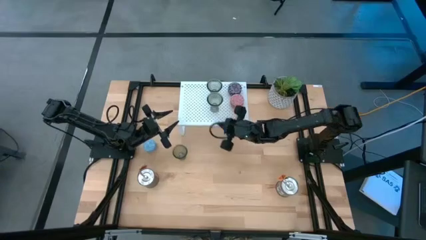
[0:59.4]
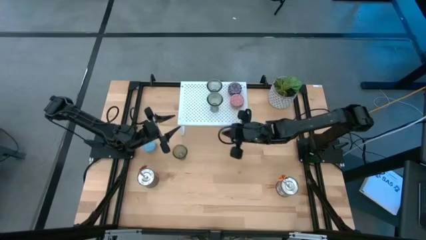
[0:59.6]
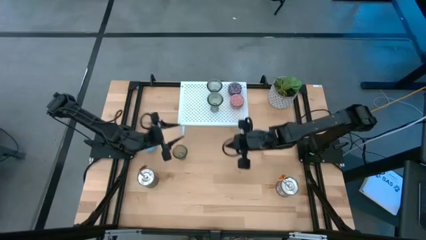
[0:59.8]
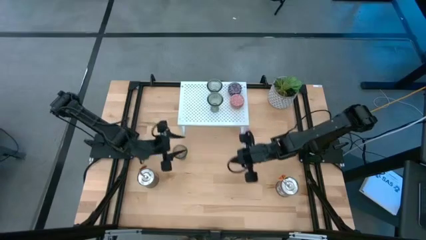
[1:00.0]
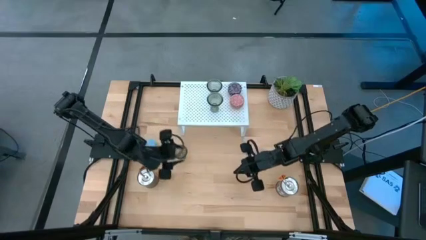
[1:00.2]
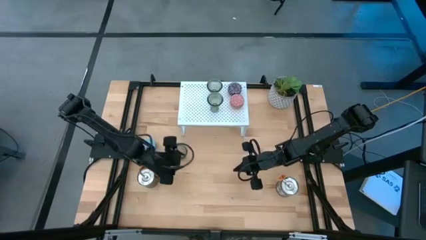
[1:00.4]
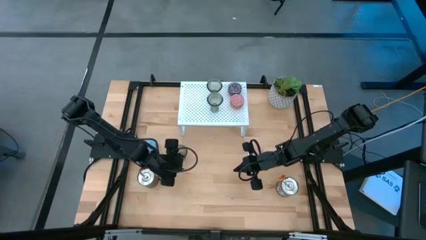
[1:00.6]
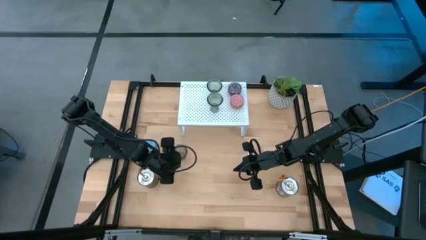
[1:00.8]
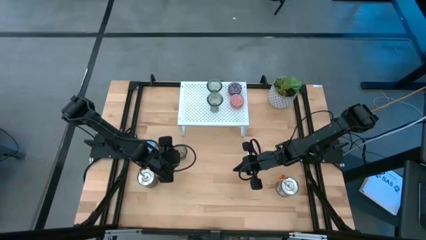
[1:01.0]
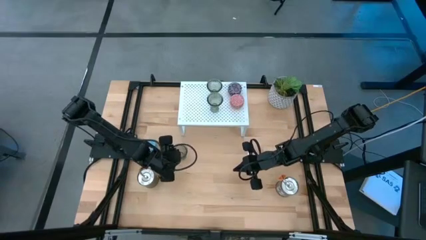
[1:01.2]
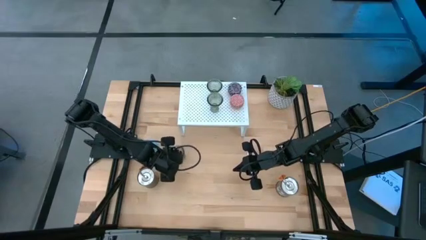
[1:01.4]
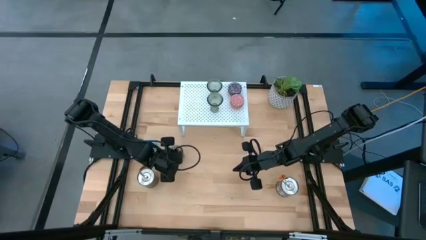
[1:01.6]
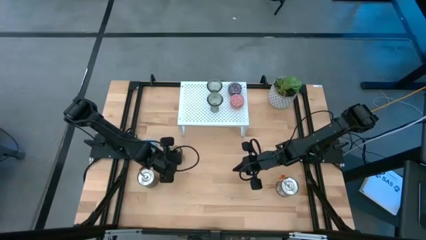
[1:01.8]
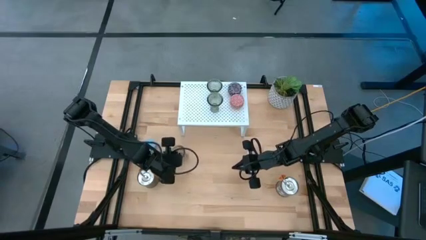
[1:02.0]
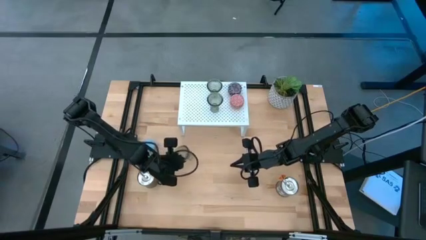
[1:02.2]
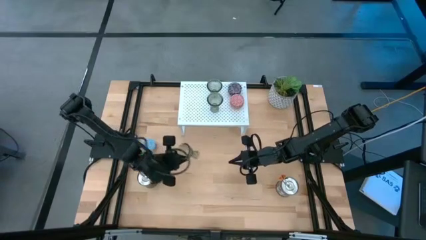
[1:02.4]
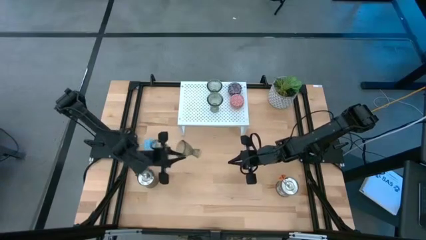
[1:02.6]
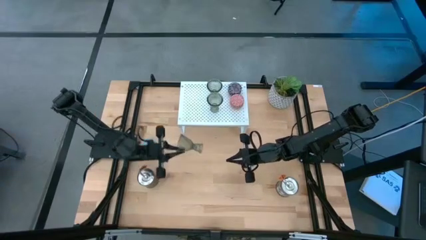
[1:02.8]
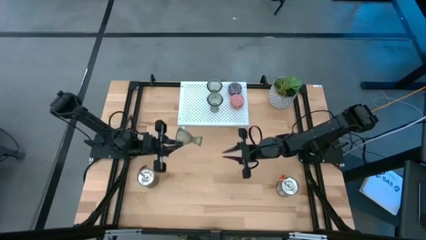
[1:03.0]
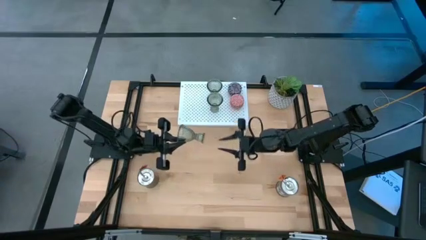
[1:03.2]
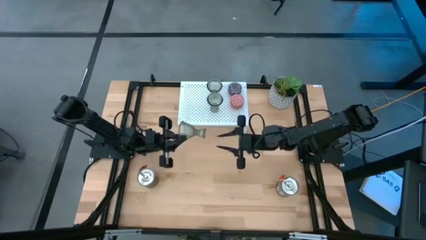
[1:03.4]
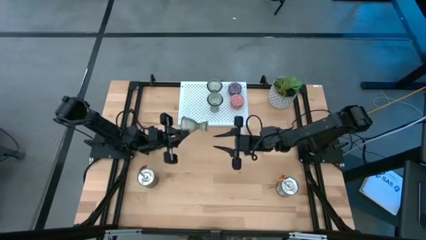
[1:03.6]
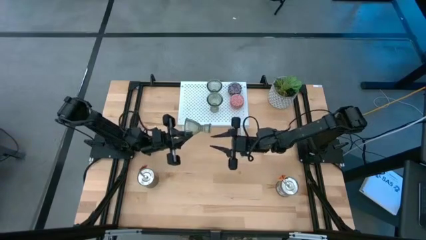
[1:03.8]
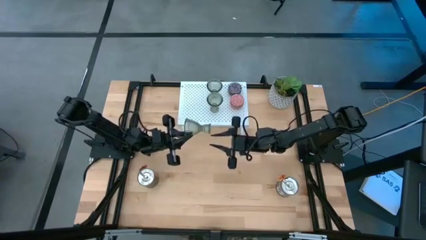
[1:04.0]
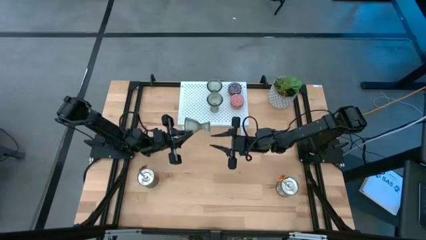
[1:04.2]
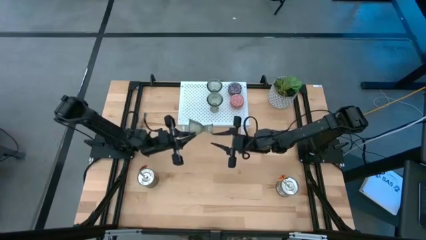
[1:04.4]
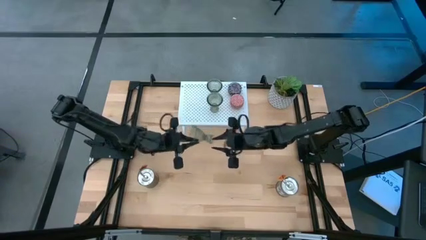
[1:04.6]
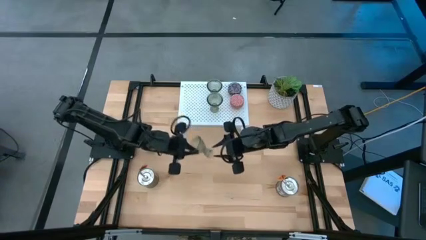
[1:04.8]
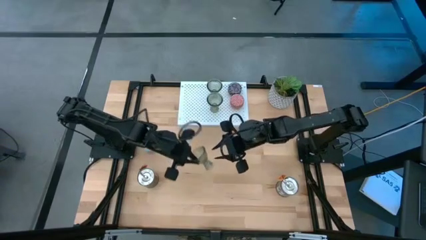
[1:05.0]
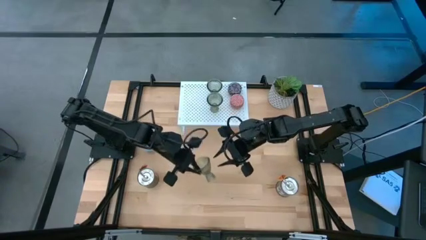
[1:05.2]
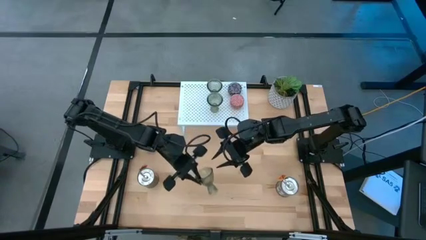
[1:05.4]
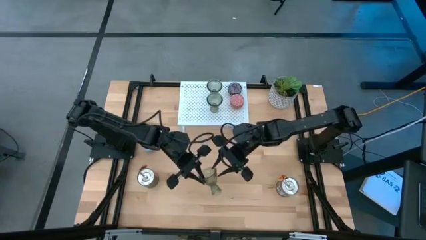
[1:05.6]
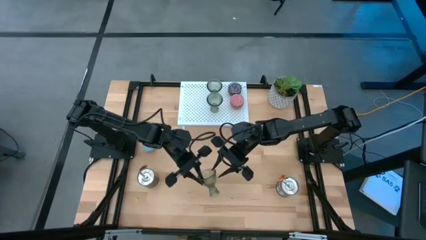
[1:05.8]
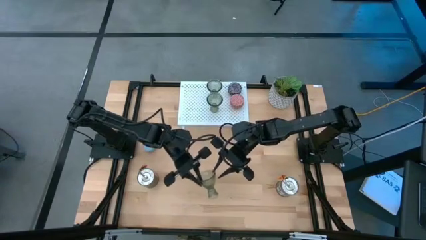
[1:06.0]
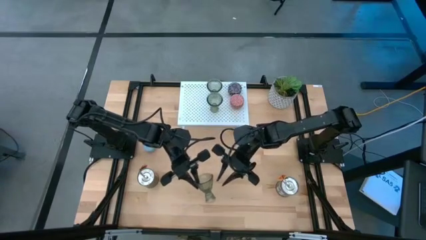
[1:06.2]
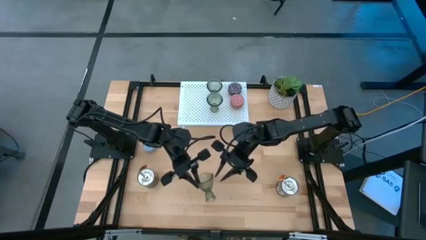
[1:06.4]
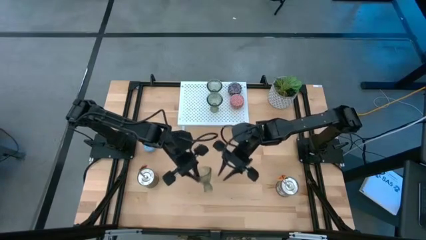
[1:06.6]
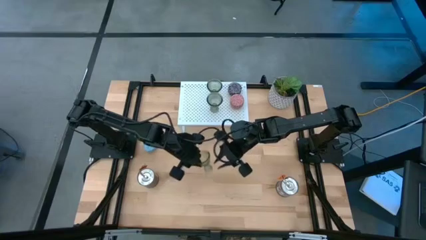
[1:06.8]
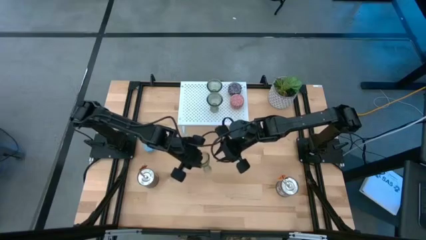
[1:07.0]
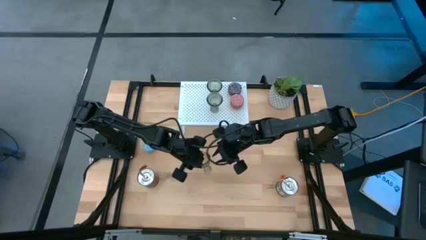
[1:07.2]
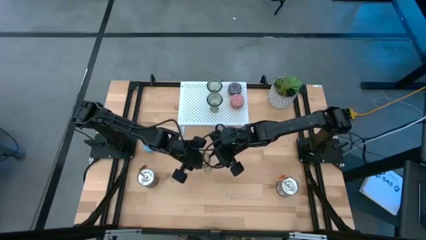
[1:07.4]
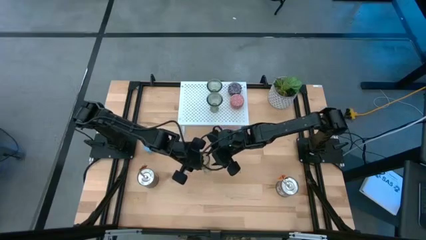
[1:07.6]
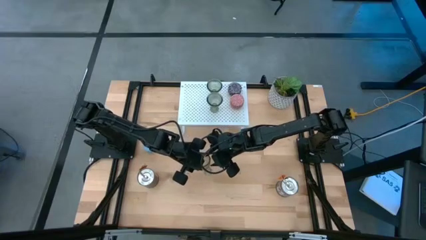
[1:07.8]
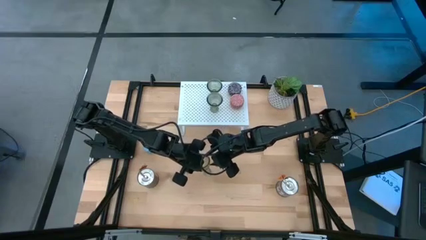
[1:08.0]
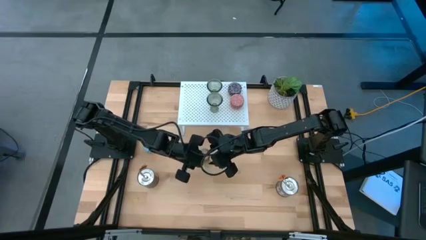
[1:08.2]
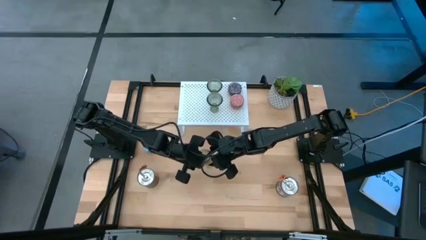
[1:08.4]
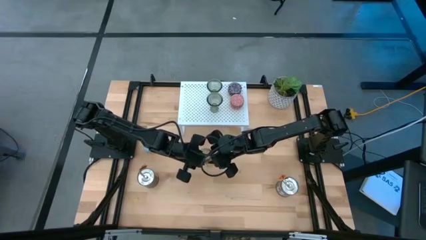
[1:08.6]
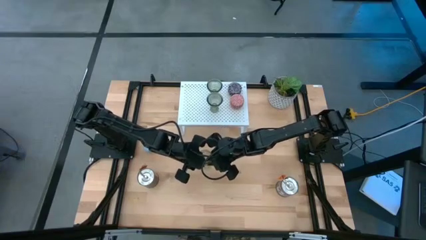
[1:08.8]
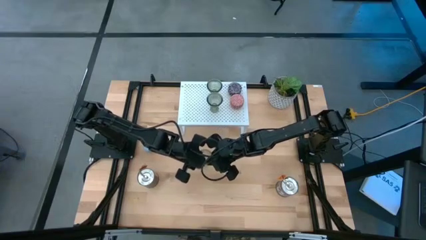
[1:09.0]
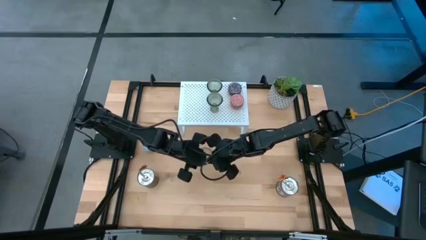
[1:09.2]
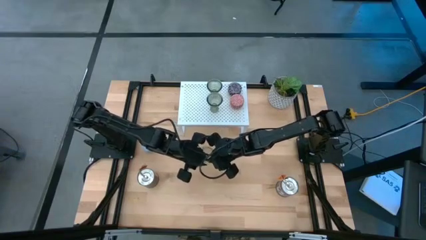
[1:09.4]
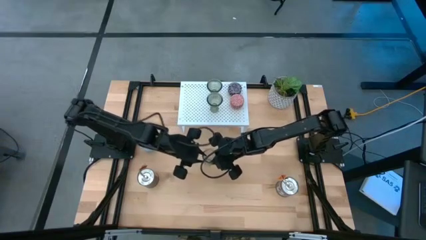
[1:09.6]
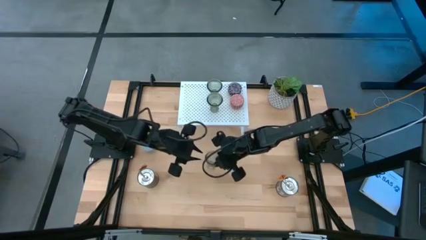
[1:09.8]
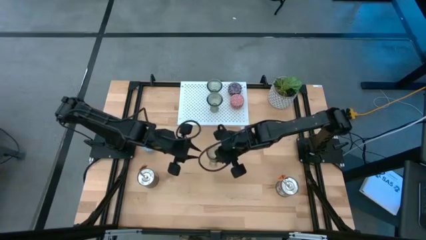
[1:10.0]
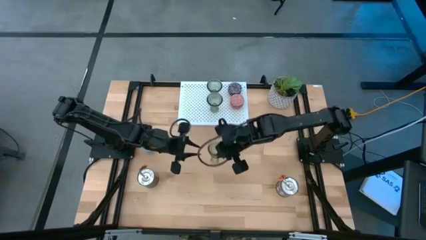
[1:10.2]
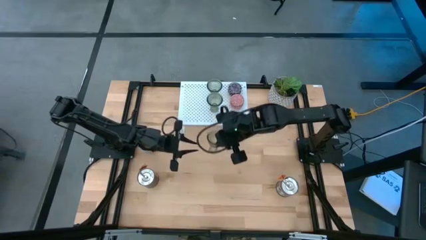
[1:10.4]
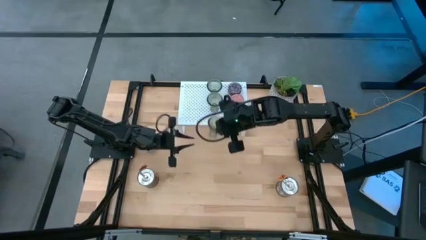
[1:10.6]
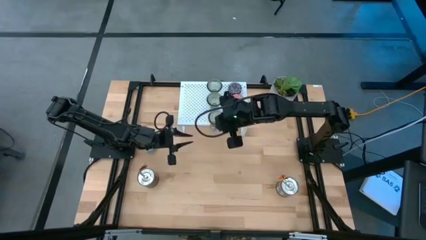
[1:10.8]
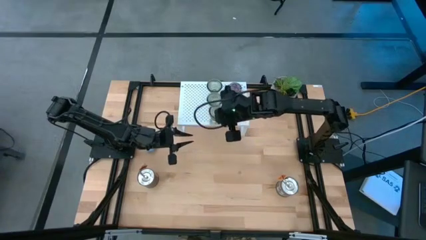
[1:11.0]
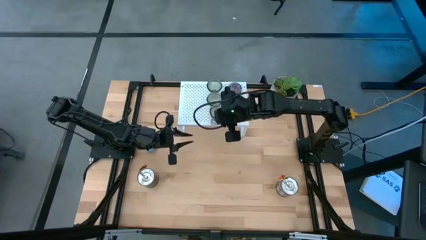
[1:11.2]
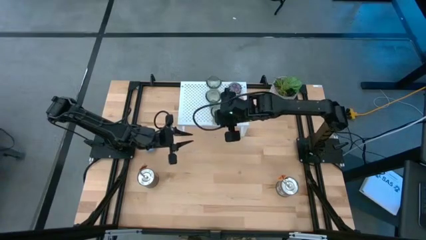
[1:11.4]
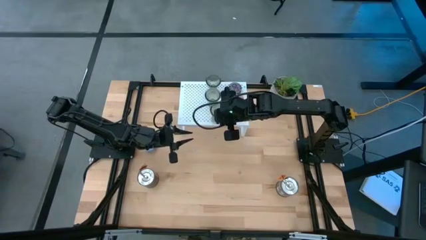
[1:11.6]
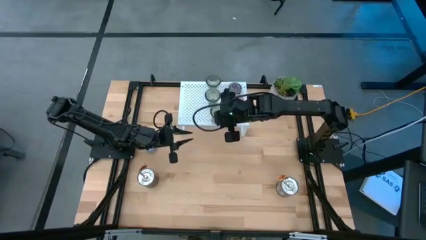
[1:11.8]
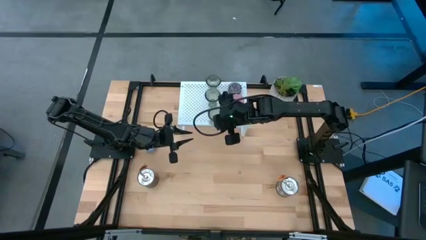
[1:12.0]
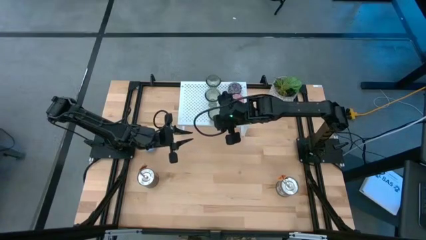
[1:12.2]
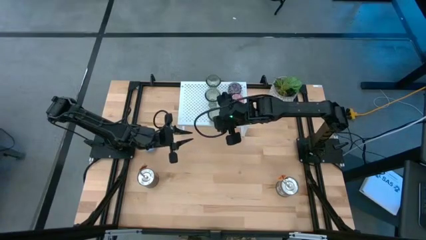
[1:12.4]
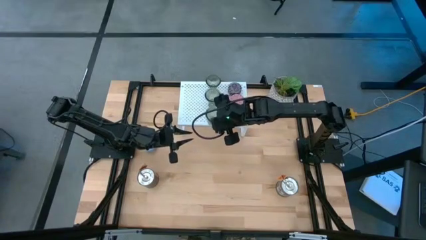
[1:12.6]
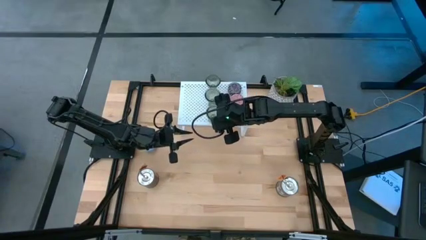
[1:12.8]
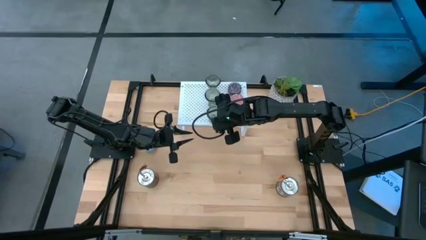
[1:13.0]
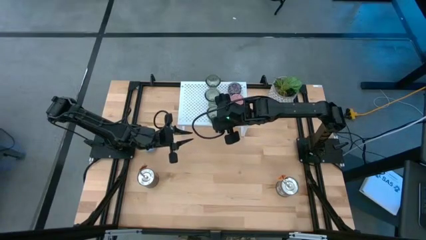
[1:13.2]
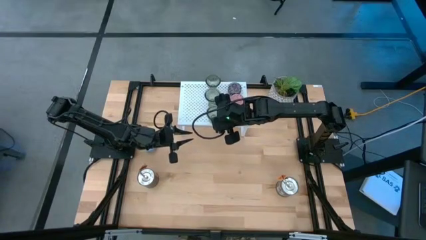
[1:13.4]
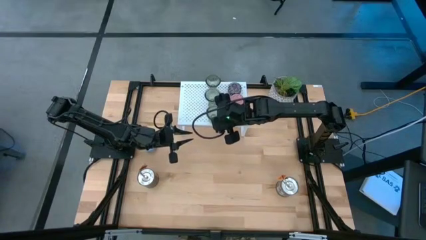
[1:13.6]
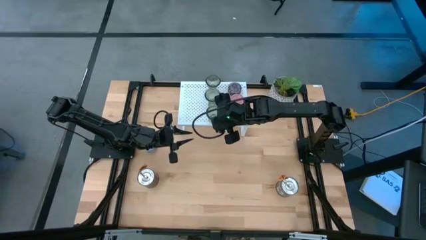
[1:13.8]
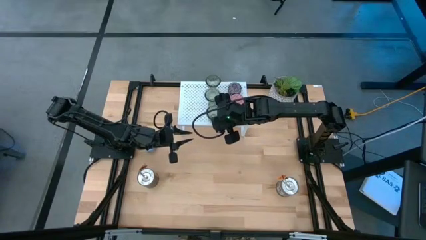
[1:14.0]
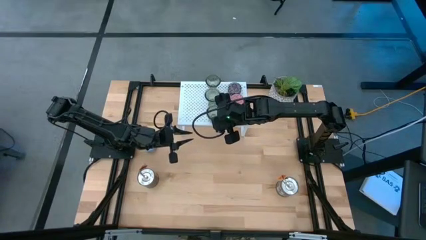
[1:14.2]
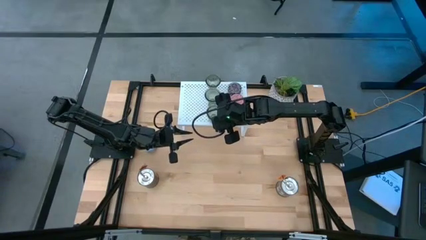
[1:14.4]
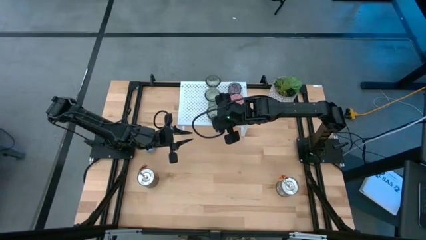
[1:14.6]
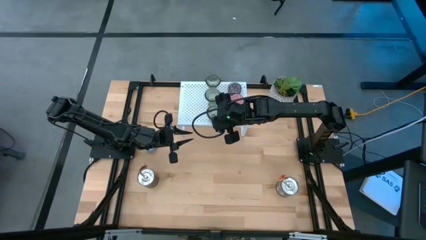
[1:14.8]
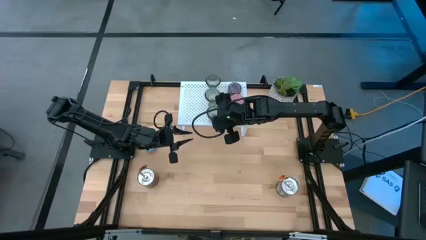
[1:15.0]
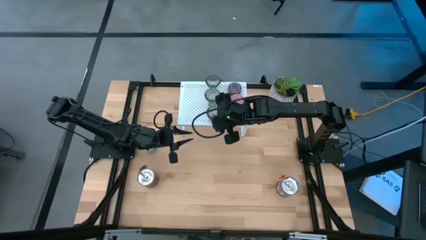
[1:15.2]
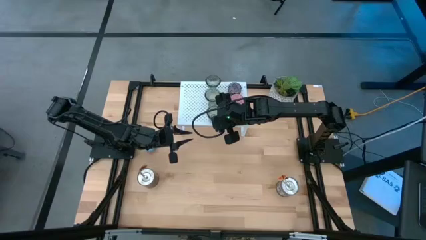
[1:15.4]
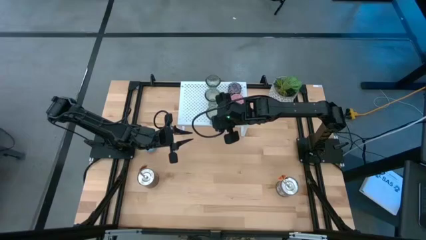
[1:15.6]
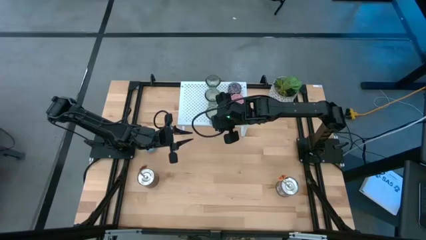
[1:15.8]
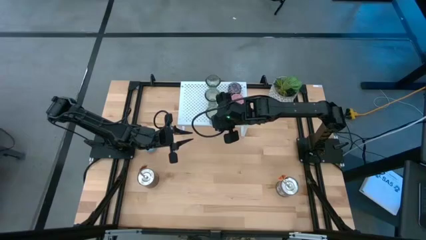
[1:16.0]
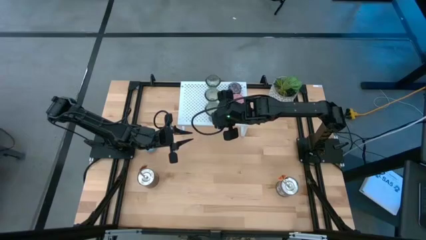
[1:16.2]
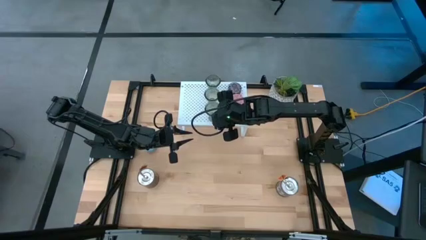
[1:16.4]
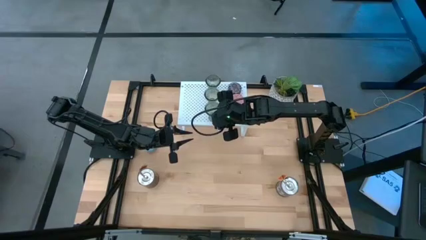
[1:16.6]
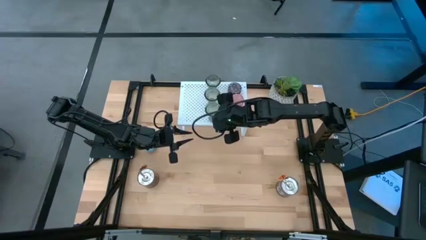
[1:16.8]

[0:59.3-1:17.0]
Task: Pick & Place candle stick holders
Put the green glass candle holder on the shelf aligned with the other glass candle holders
